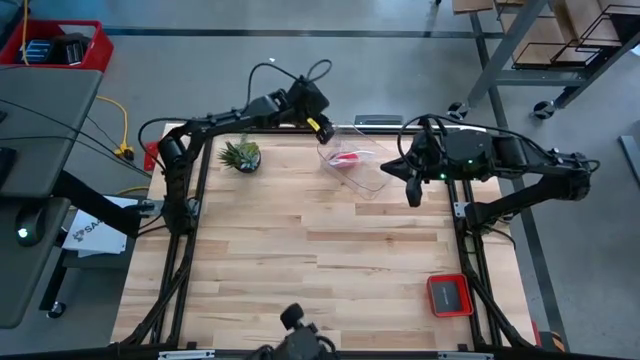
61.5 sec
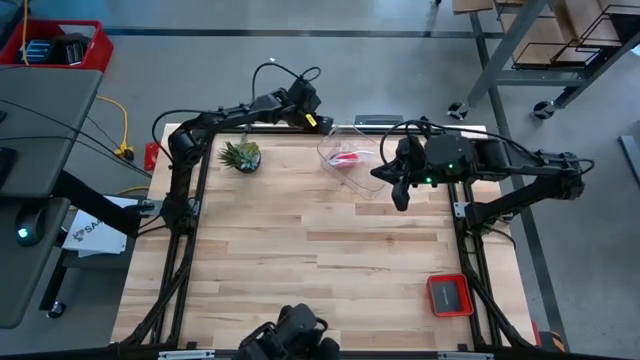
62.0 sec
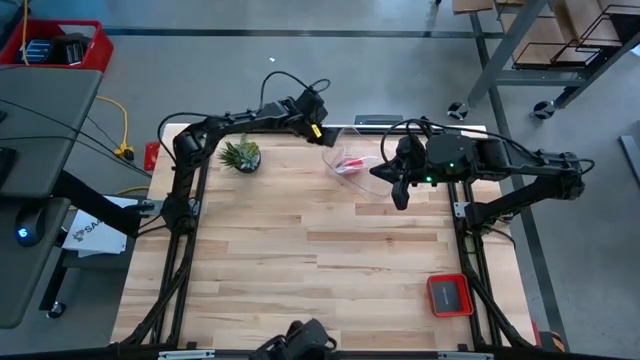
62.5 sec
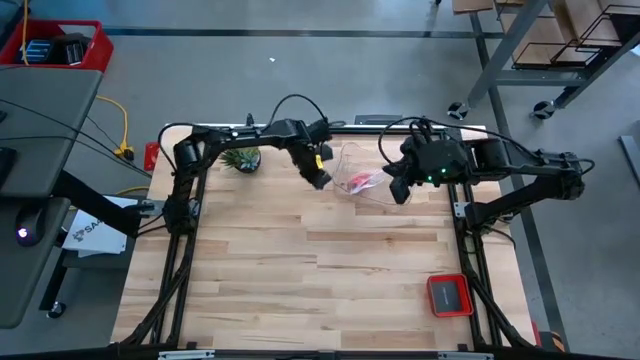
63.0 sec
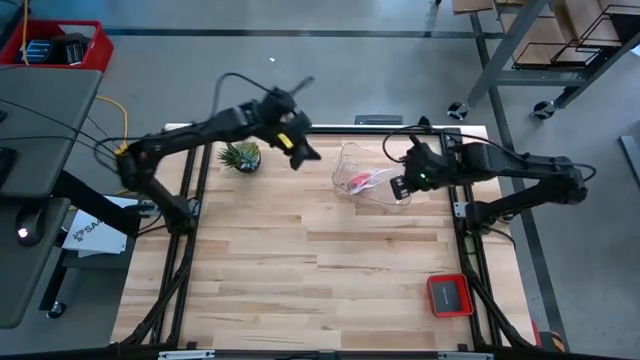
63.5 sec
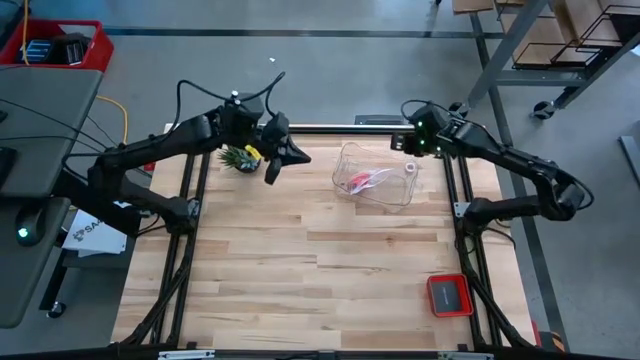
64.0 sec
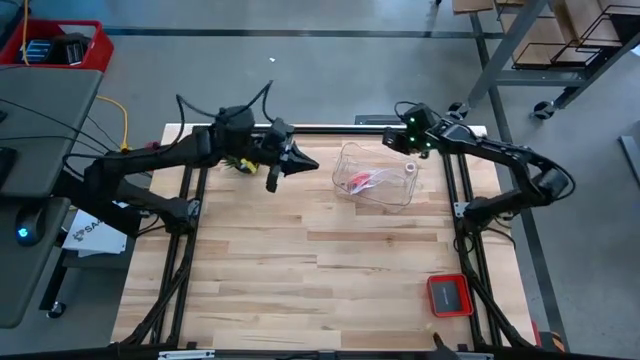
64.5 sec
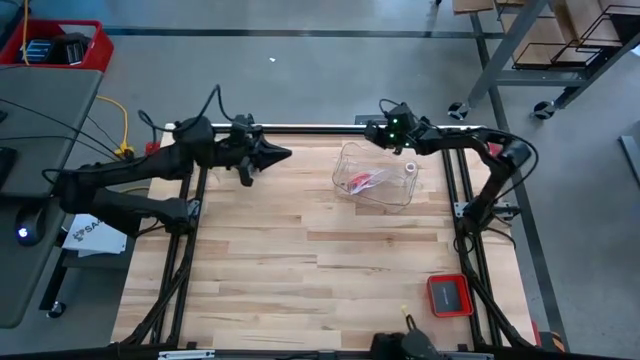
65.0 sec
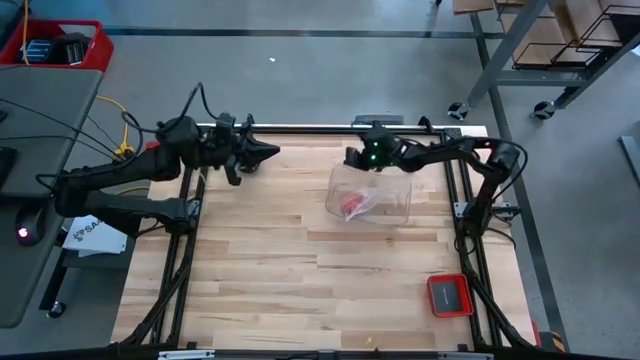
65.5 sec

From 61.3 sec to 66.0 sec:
Task: Roll bandage
Adjust the transparent bin

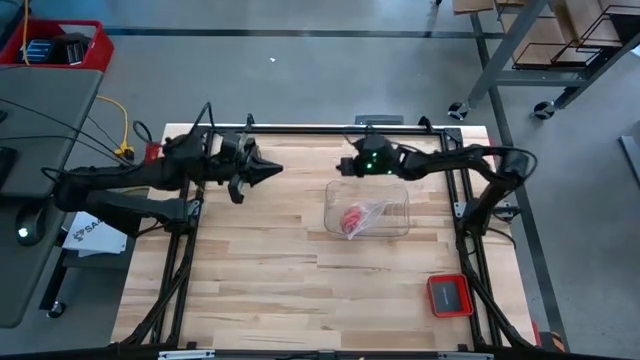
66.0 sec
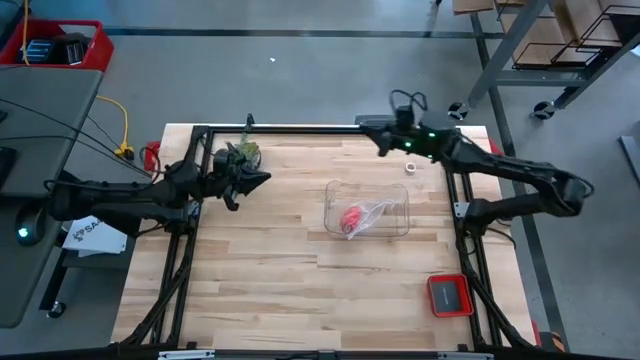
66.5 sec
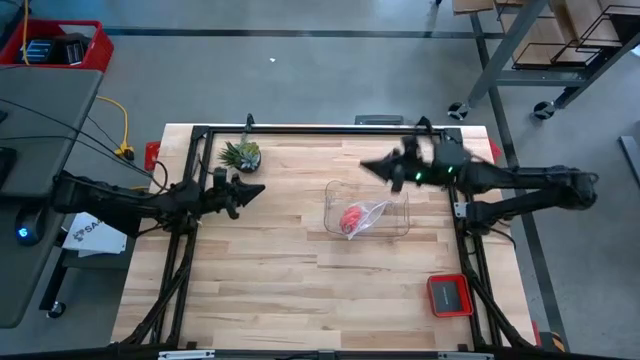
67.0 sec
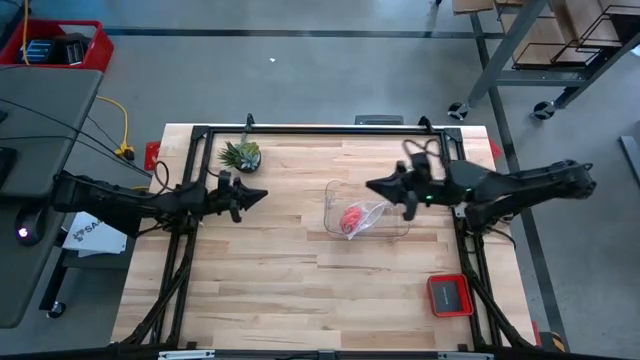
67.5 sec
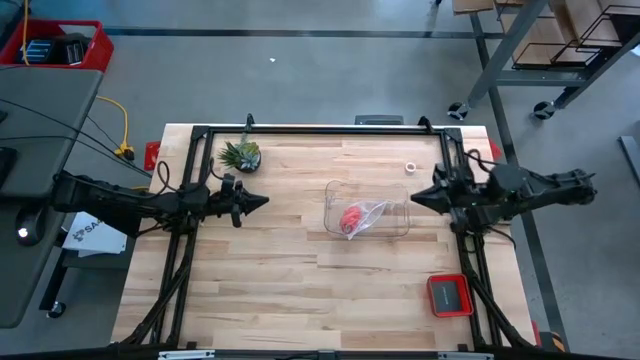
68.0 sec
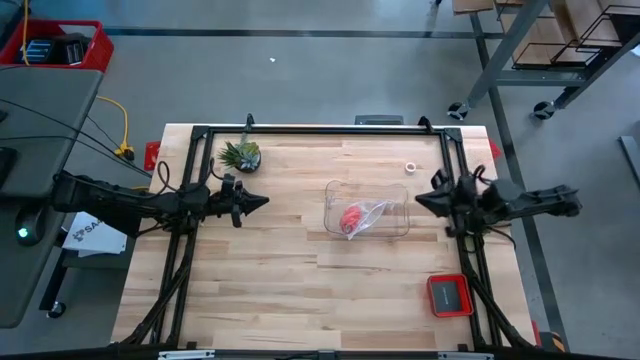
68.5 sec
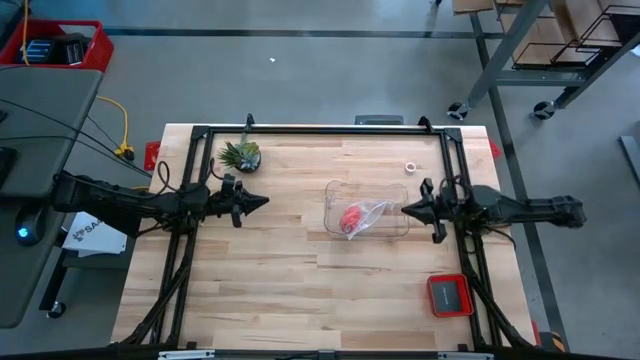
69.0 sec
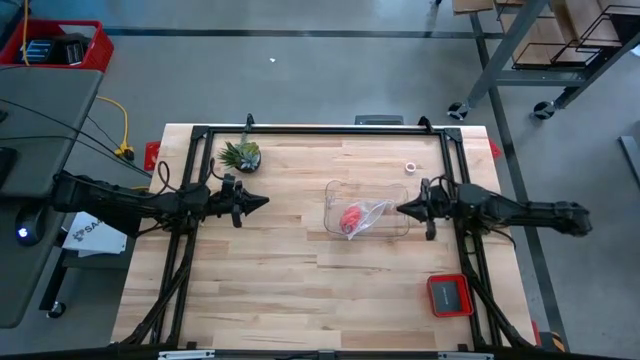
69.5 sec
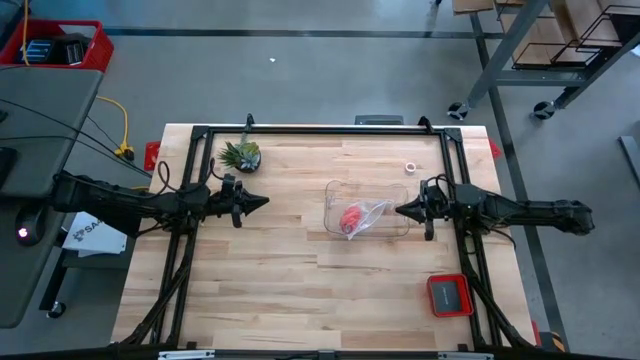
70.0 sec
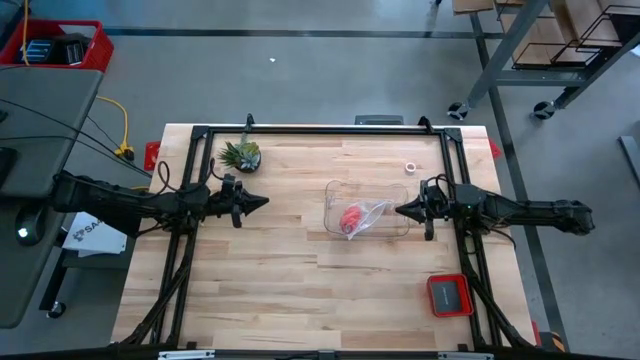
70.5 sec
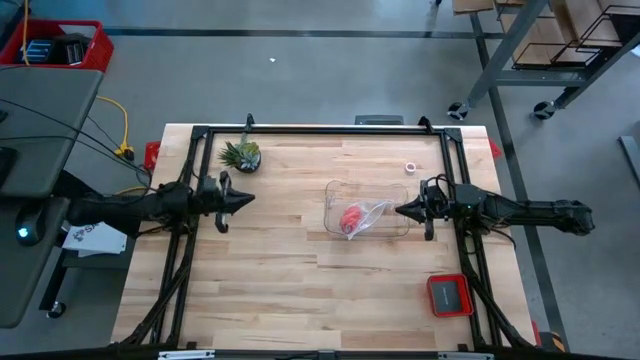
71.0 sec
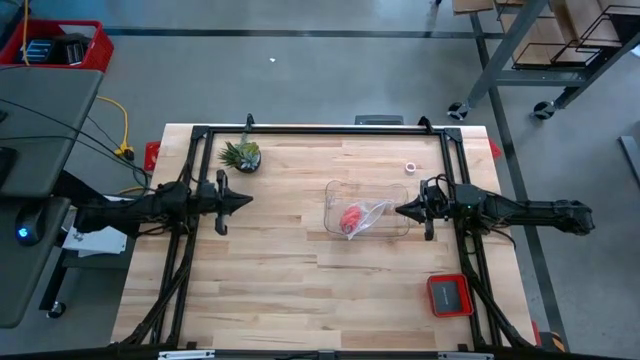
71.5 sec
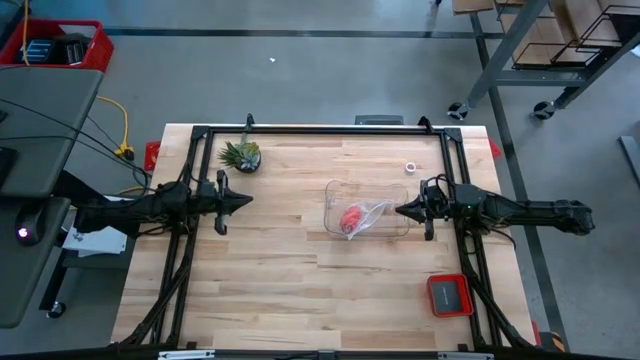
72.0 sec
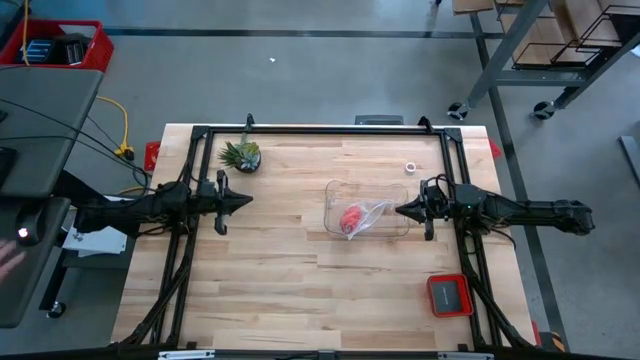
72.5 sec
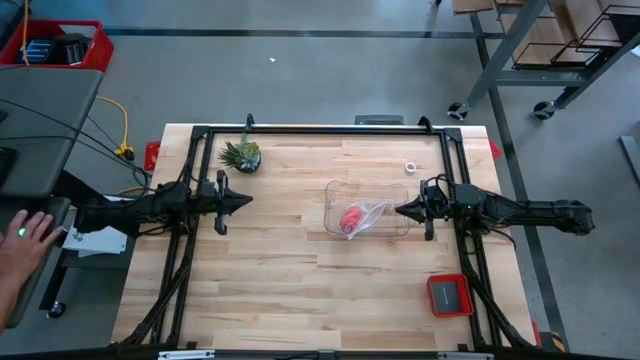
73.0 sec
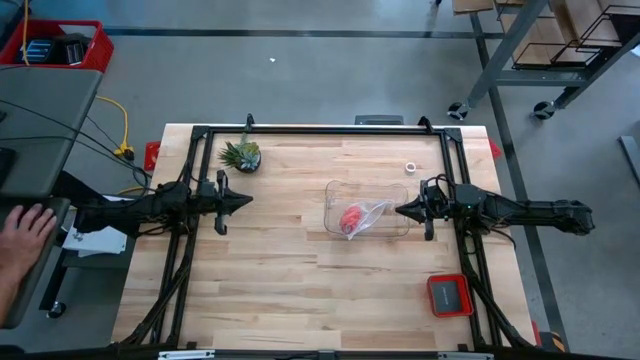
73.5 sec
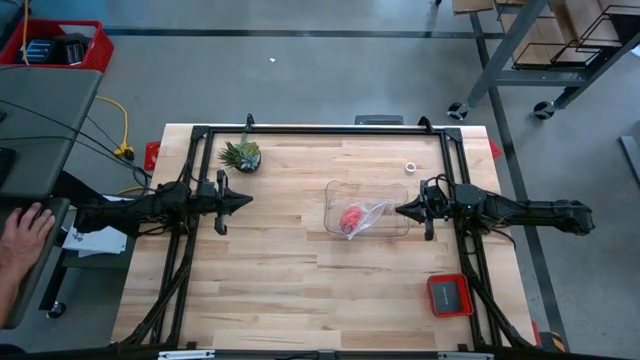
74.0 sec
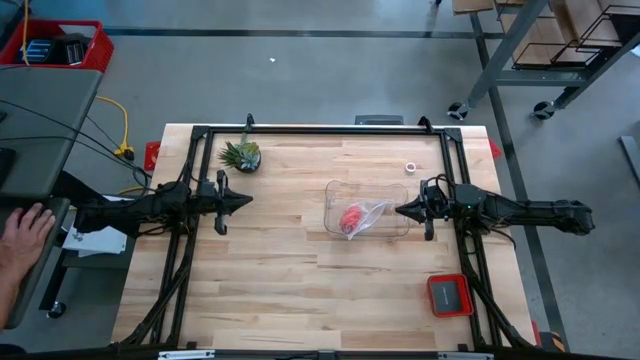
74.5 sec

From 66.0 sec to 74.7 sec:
Return to Home Position

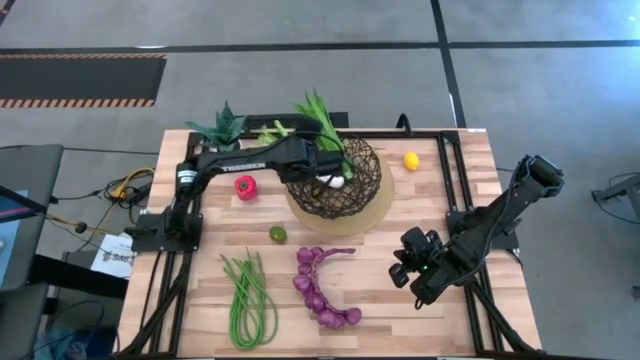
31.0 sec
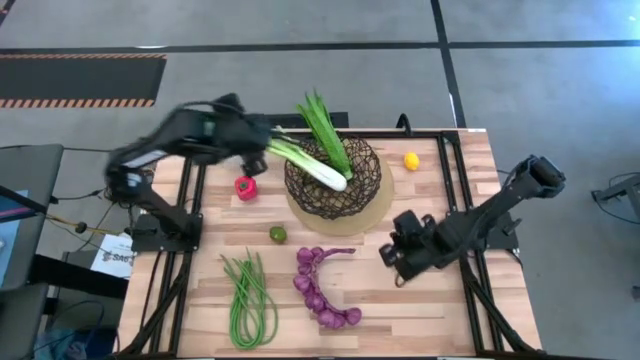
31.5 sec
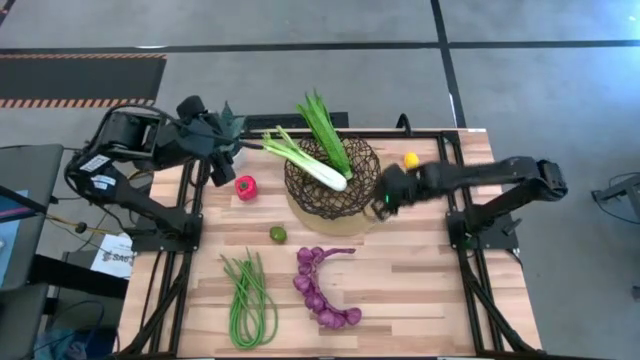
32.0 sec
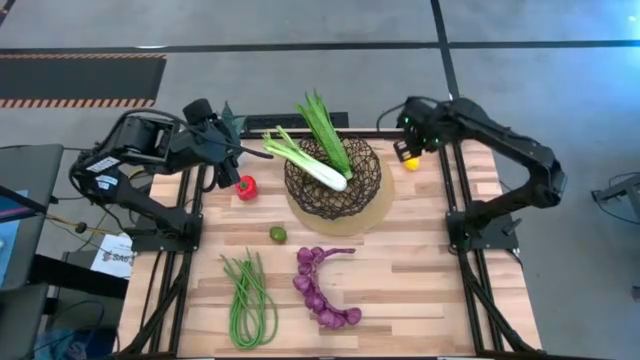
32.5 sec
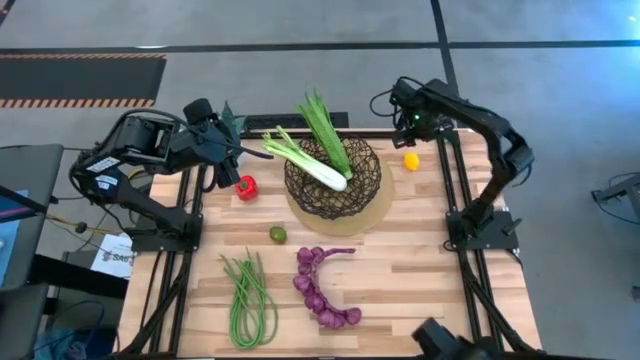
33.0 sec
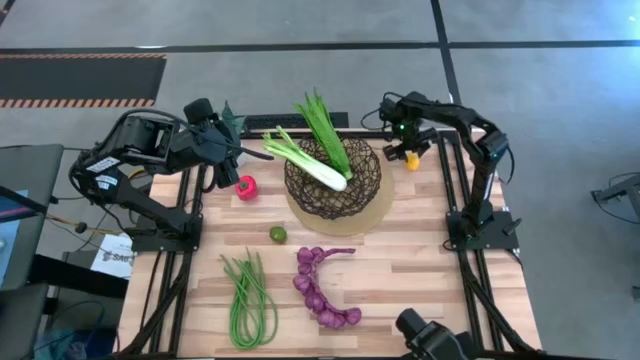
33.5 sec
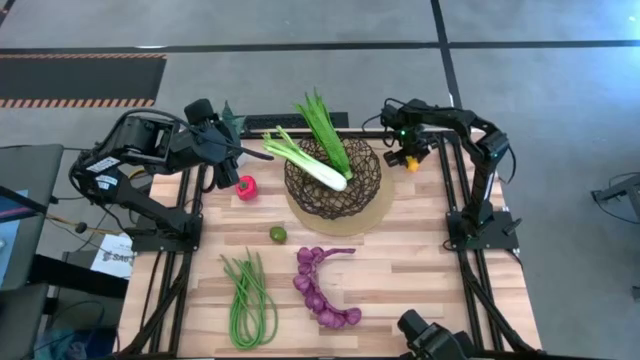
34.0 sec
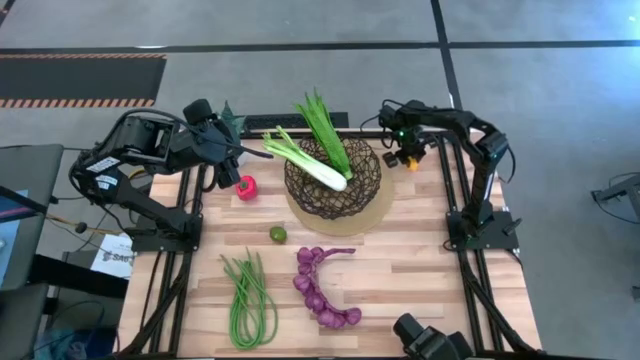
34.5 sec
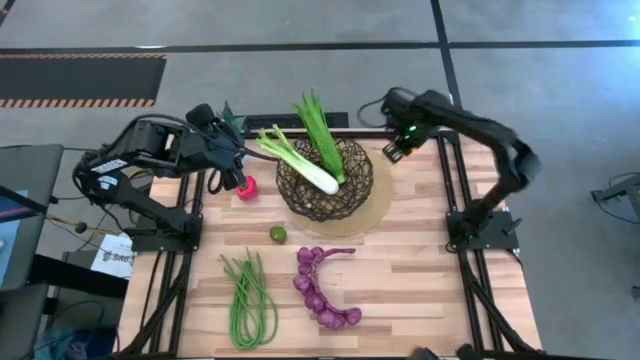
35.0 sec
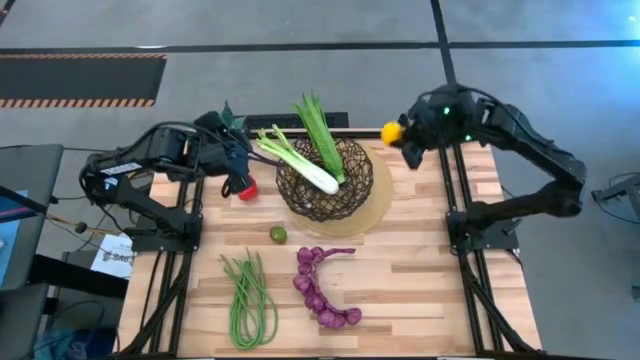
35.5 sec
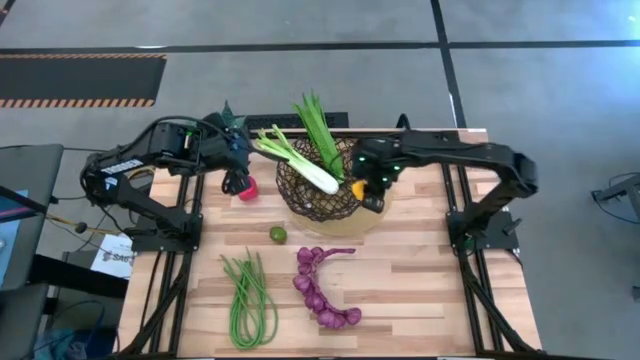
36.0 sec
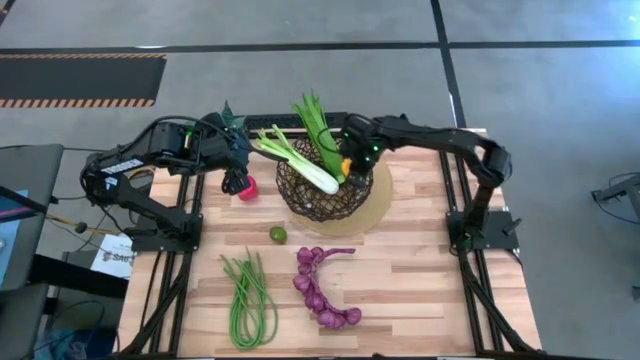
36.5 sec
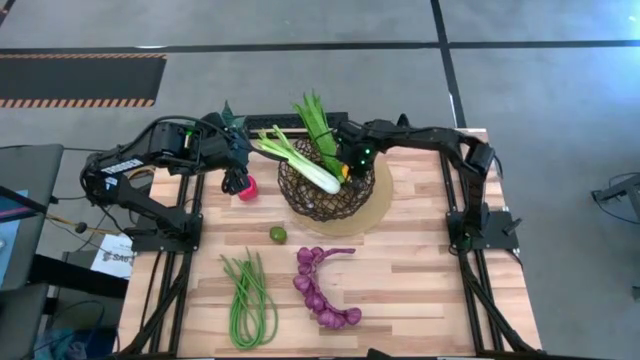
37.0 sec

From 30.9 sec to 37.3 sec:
Task: Build produce basket
Put the lemon into the basket
